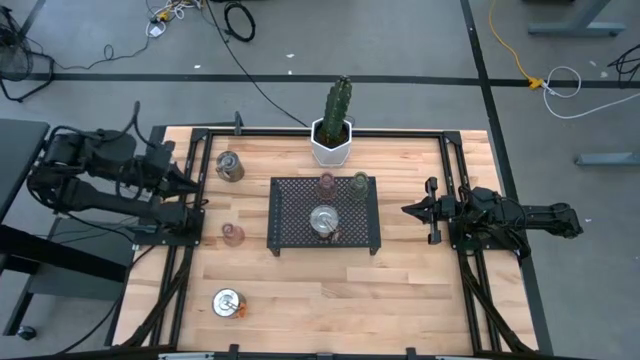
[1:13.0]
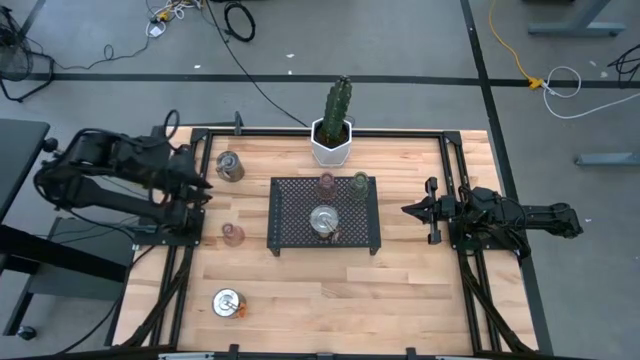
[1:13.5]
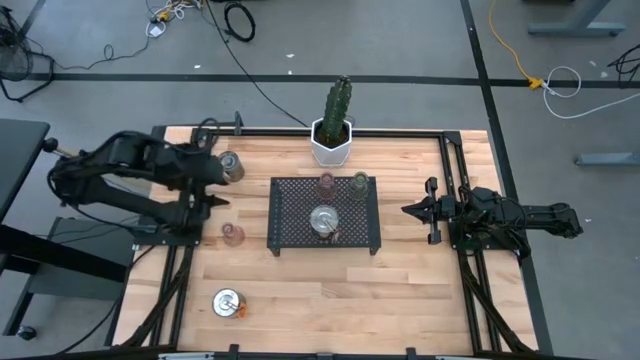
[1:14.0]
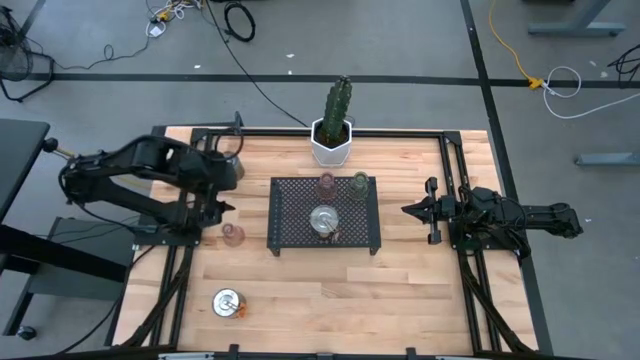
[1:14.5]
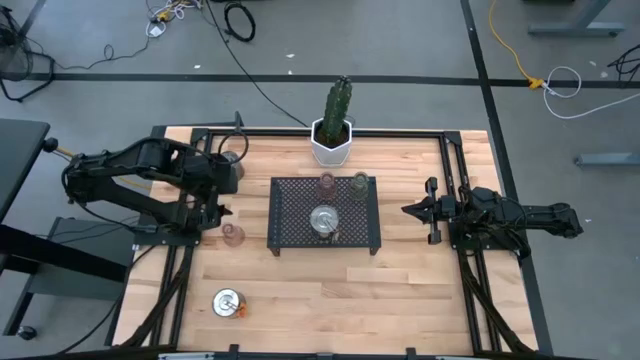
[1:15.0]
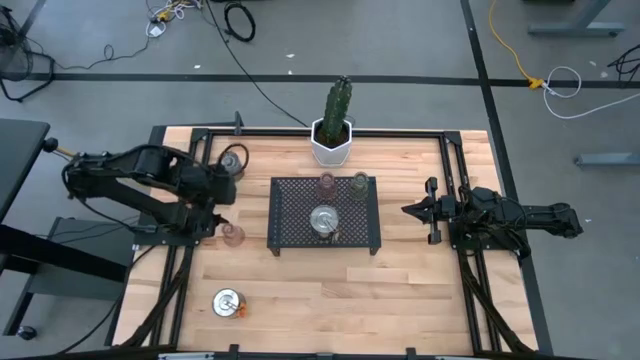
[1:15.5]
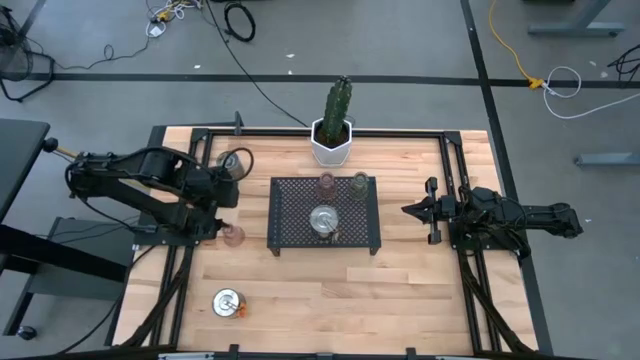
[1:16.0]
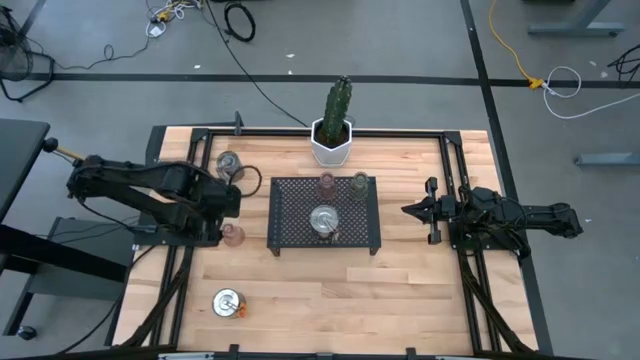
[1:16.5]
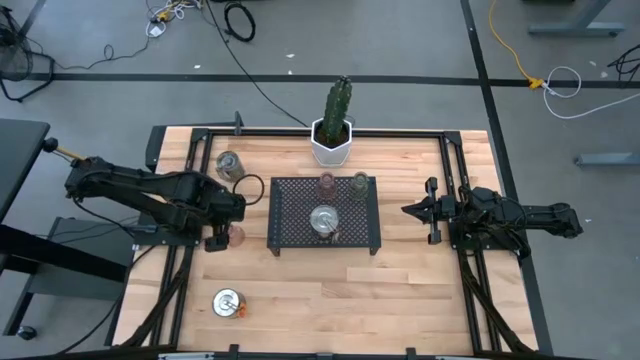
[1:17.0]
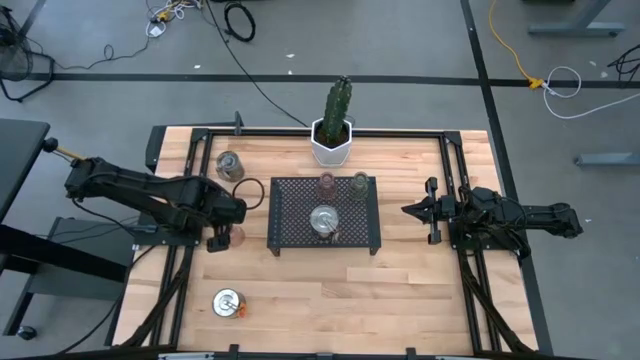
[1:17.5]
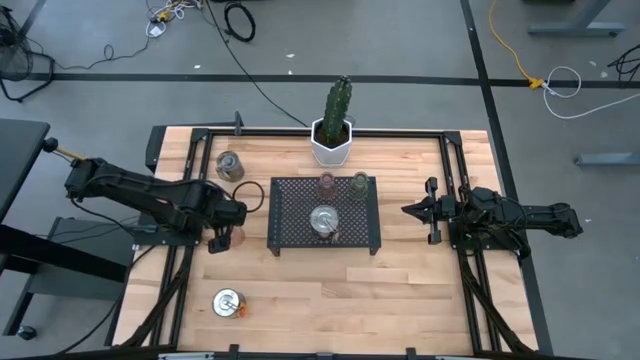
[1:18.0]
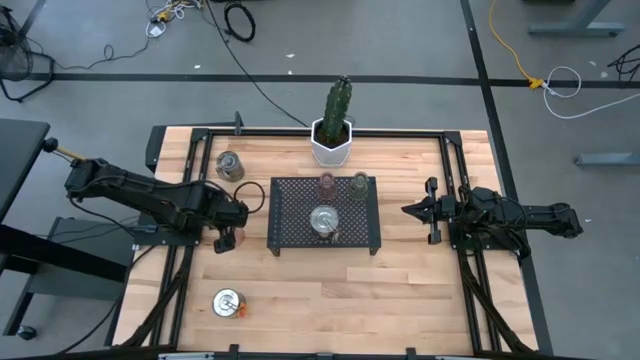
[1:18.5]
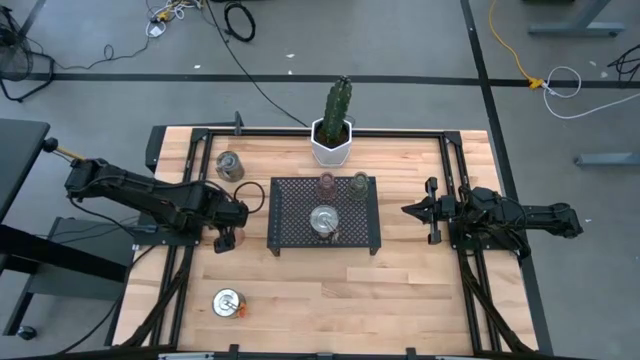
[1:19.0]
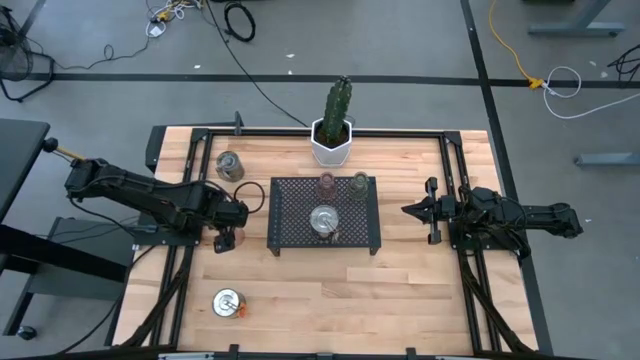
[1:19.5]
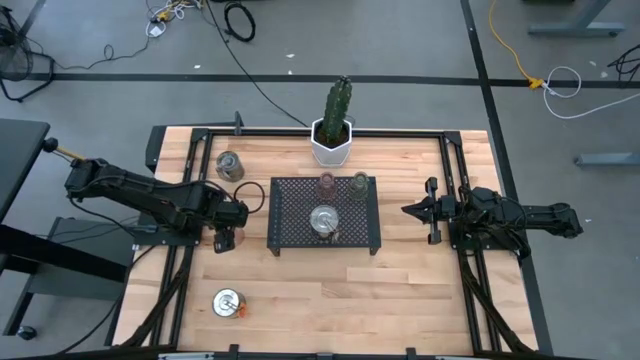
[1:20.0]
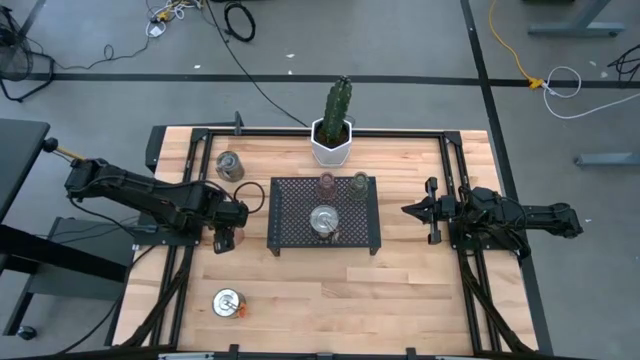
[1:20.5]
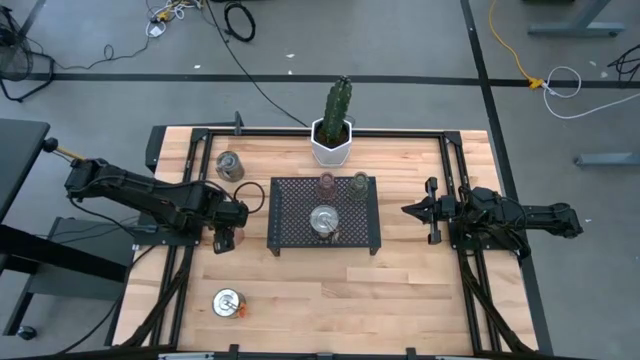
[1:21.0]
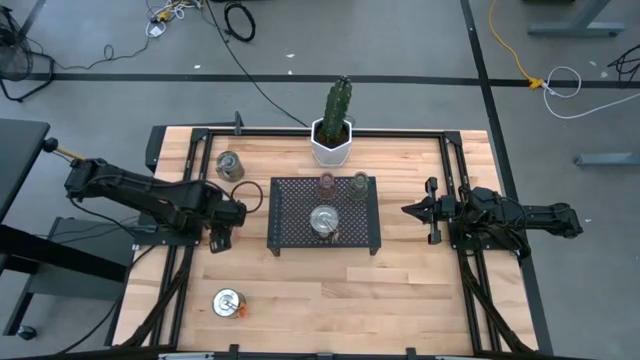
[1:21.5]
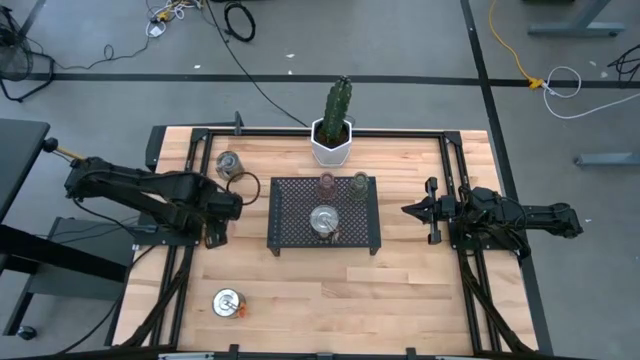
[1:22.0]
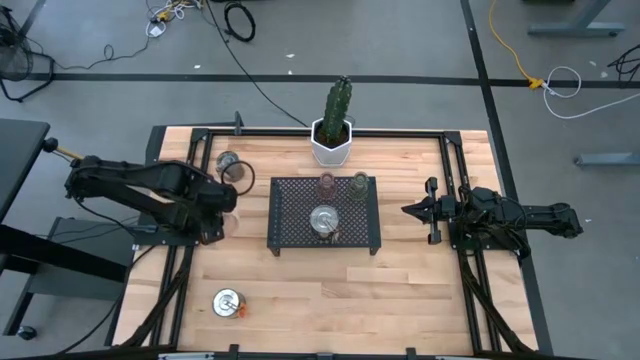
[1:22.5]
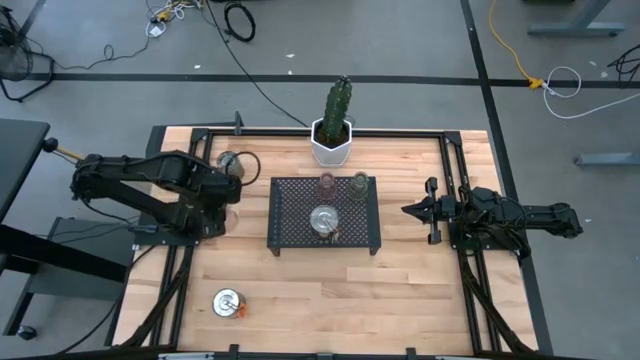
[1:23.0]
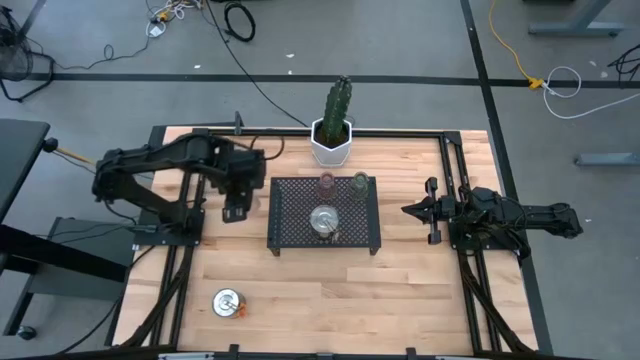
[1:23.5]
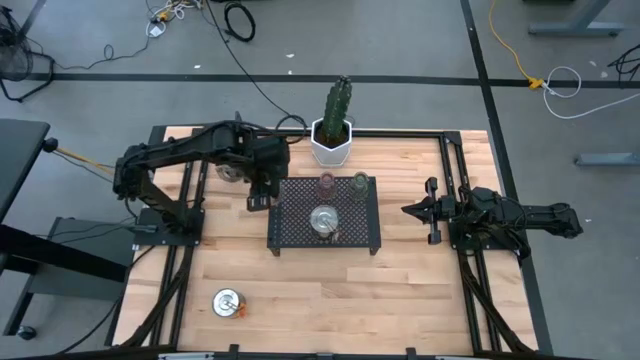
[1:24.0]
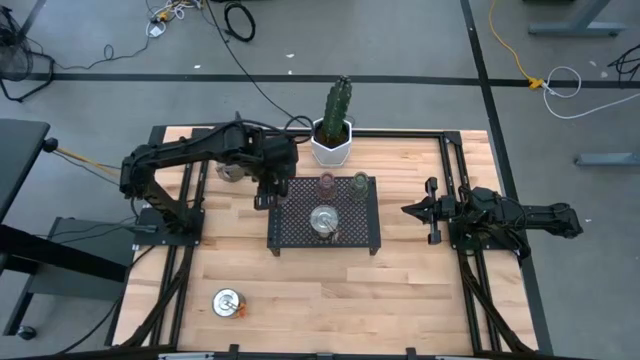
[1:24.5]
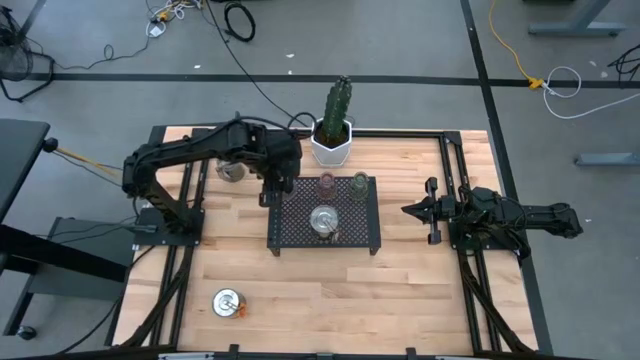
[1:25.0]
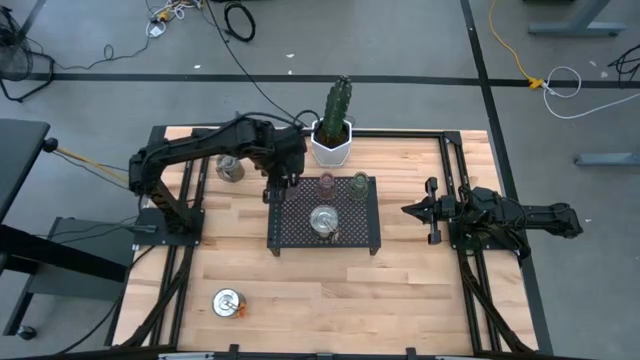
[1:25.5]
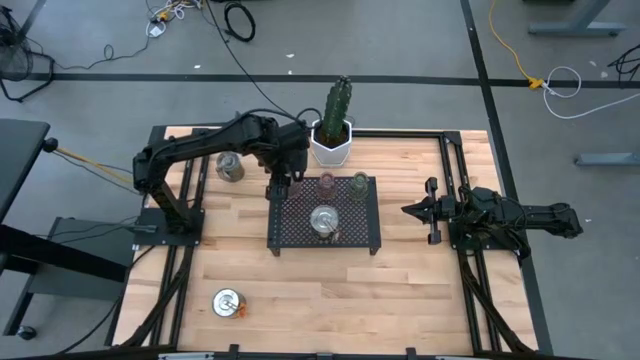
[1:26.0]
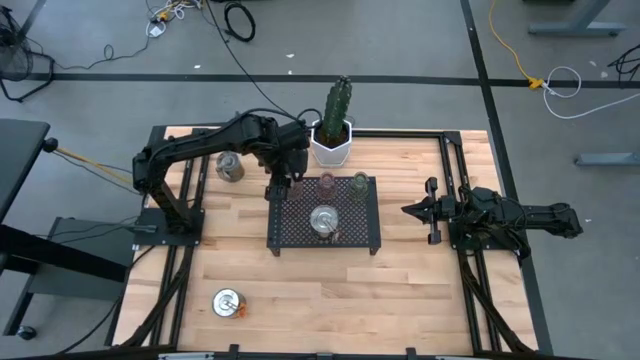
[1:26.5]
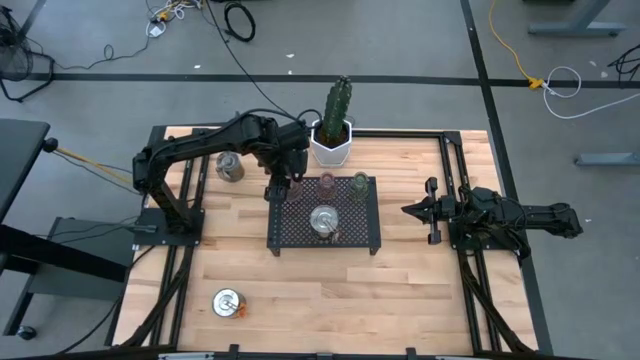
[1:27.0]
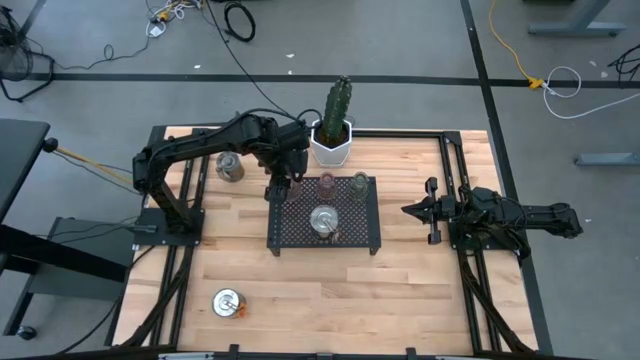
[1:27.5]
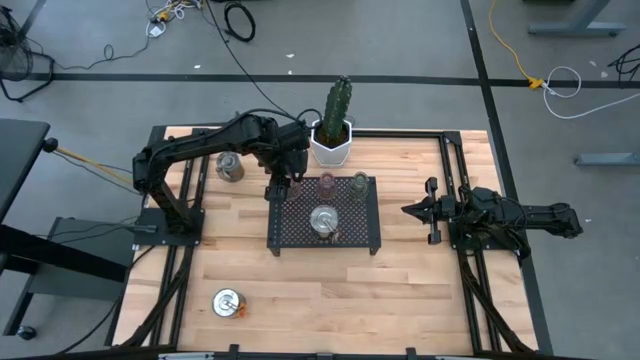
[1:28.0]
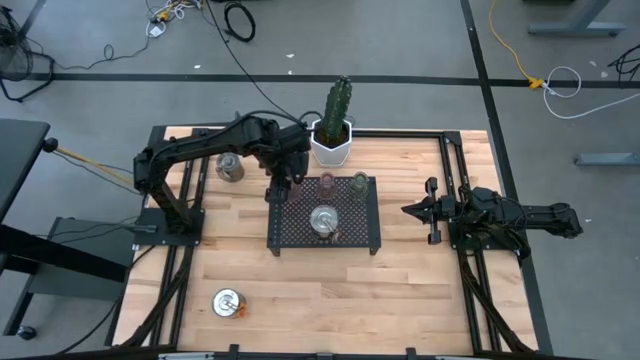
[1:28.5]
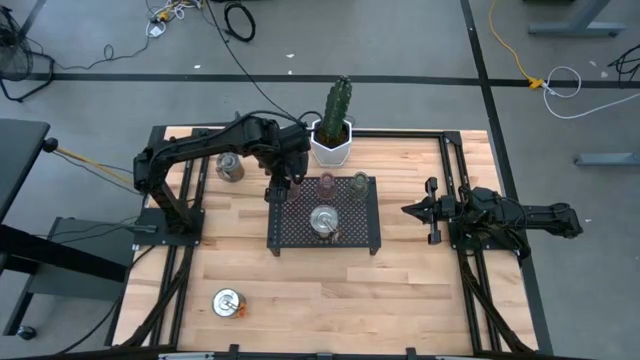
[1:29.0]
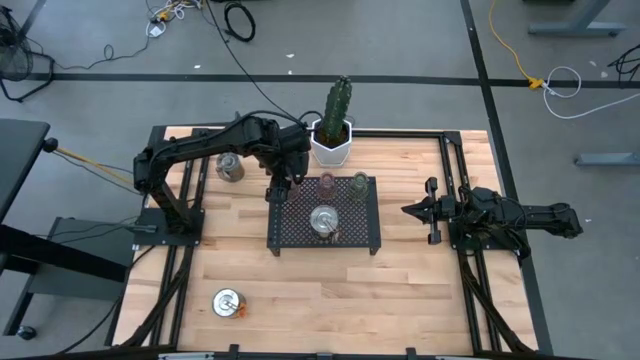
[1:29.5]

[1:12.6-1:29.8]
Task: Pick & Place candle stick holders
Put the purple glass candle holder on the shelf
